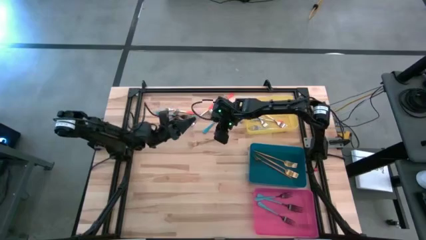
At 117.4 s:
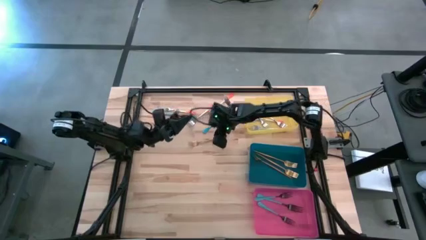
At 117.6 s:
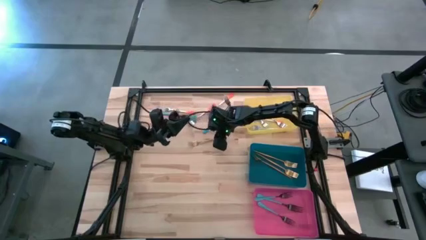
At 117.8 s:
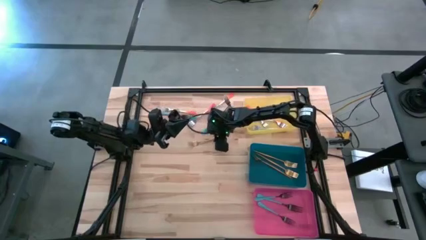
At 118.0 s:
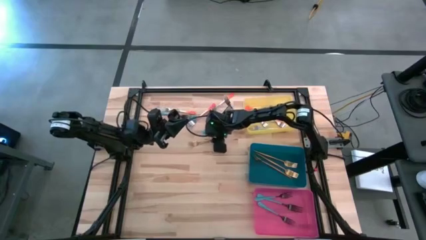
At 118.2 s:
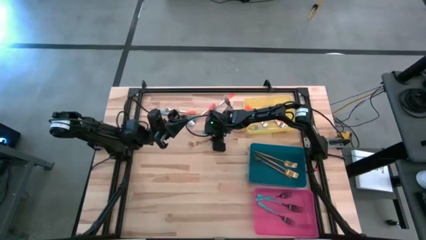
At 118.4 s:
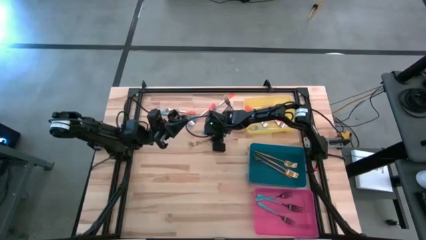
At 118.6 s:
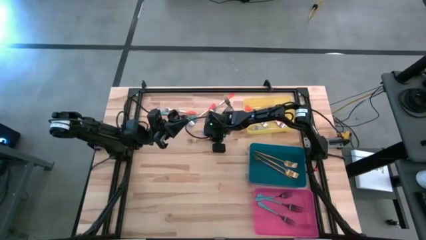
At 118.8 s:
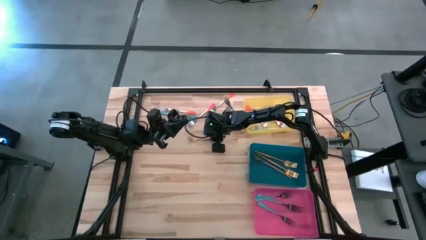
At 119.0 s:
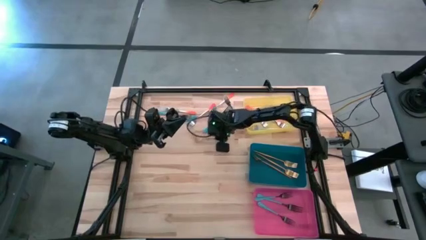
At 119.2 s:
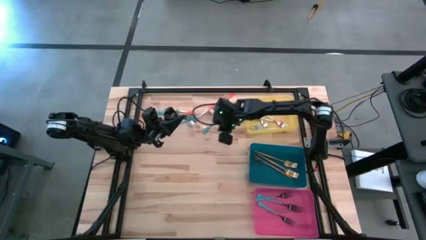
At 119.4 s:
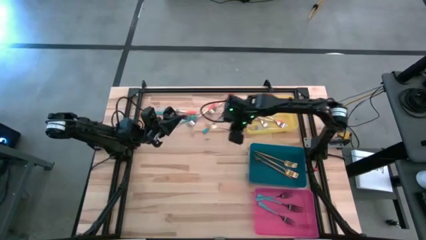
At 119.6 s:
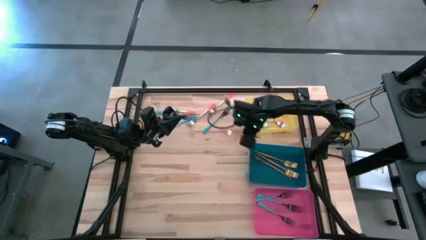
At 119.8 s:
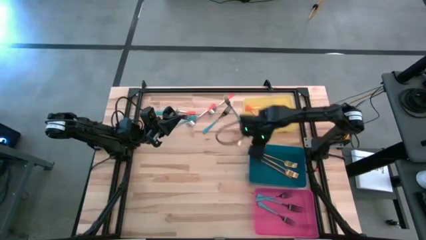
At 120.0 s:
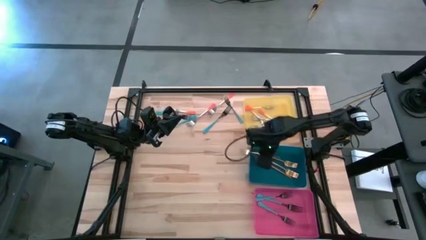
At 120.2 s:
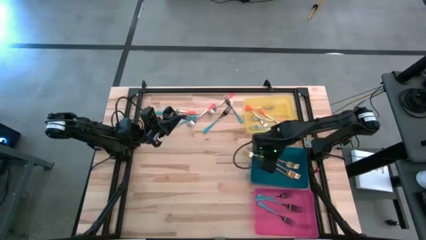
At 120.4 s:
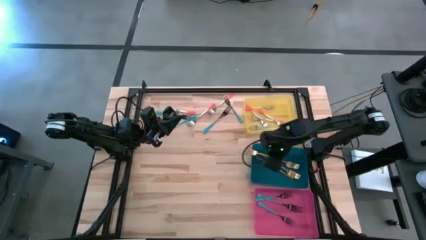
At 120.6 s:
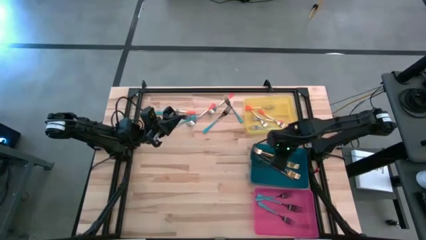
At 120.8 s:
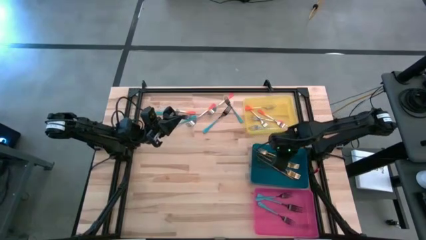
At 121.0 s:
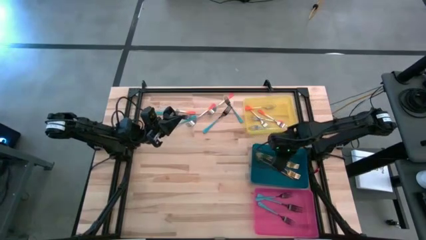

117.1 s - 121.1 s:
Task: Sort silverware by color (type)
Put the gold fork into the blue bin

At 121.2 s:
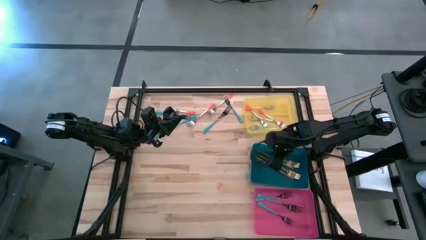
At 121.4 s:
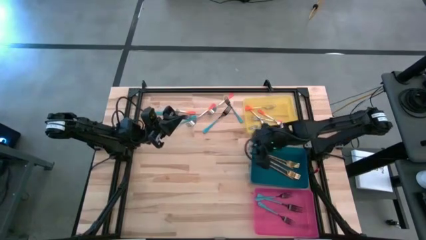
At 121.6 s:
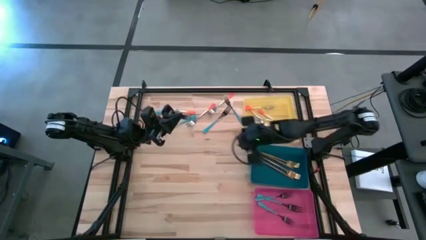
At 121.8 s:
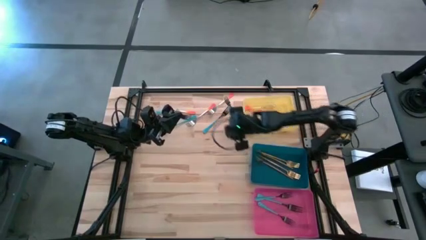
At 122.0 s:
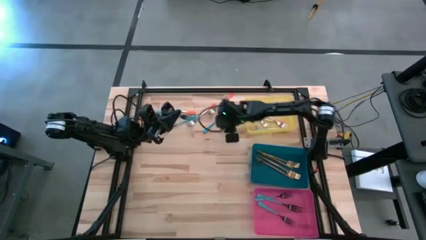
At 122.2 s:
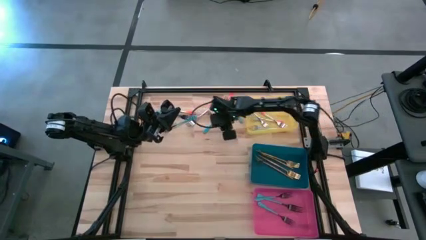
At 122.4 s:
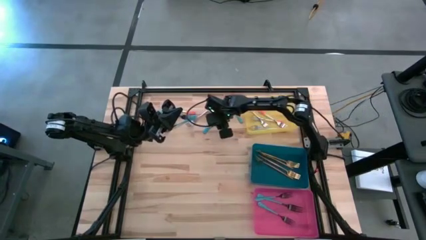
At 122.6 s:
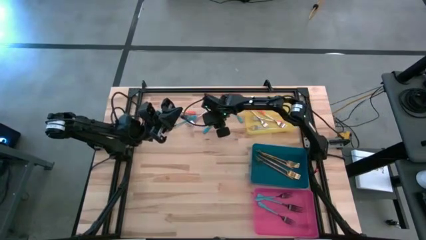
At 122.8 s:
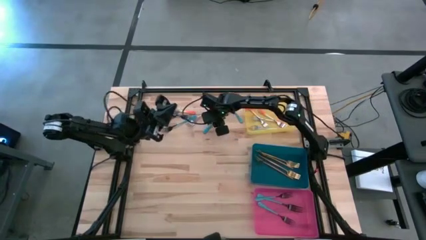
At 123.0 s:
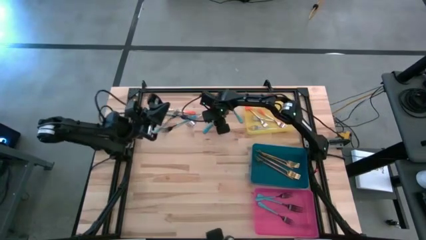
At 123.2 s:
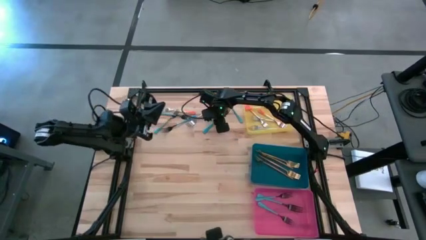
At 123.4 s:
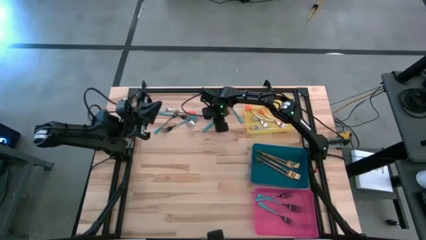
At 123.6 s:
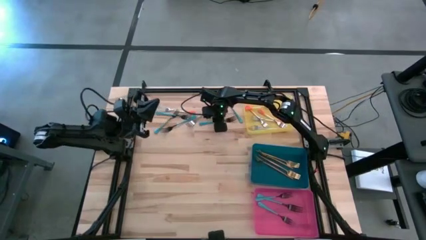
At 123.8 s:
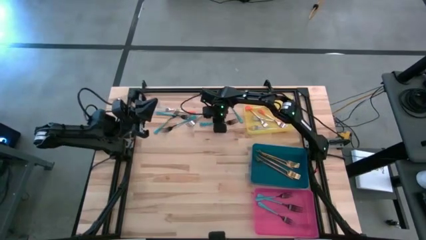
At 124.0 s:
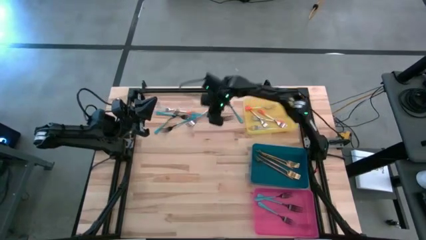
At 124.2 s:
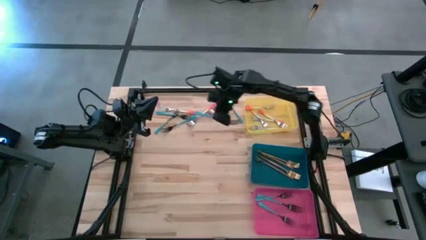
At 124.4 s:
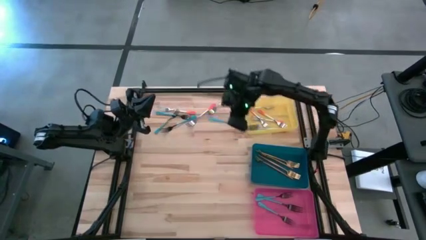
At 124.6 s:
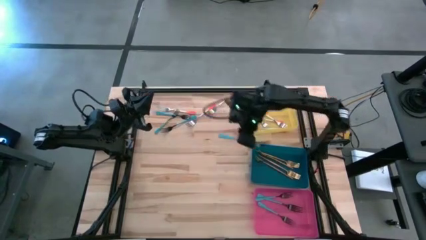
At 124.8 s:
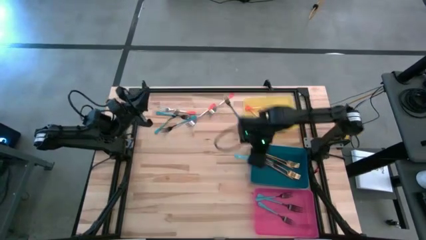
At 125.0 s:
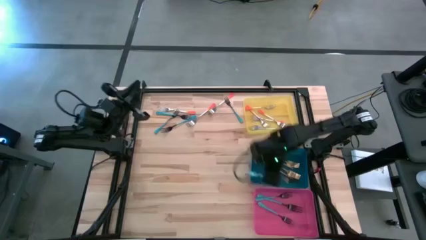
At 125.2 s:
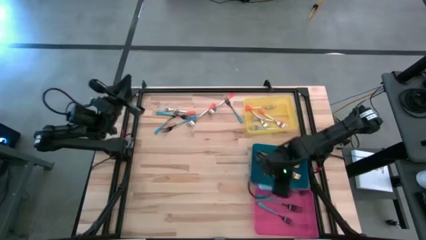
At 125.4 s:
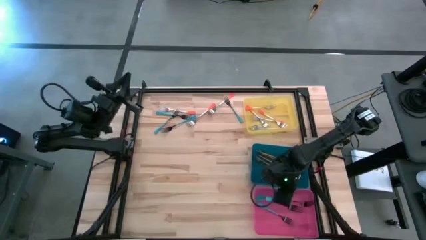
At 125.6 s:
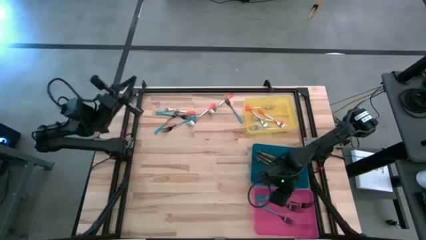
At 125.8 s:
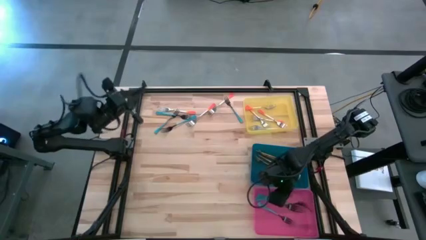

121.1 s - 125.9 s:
Put the blue fork into the pink bin

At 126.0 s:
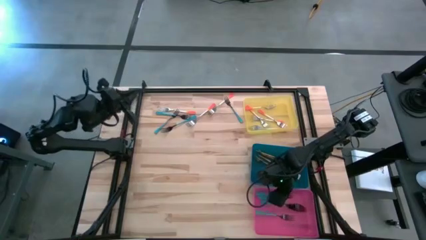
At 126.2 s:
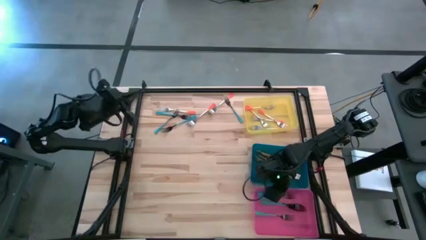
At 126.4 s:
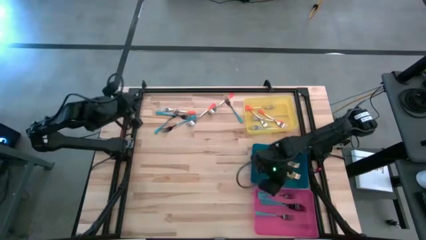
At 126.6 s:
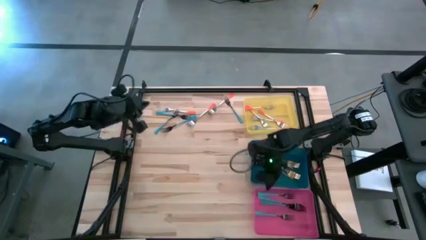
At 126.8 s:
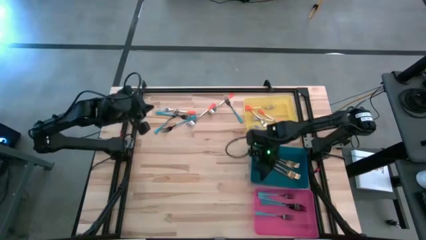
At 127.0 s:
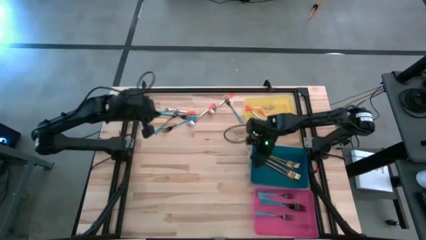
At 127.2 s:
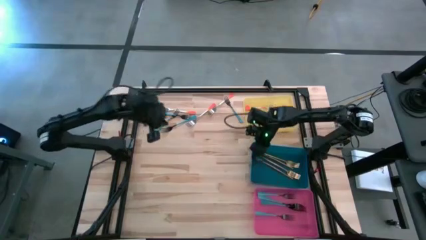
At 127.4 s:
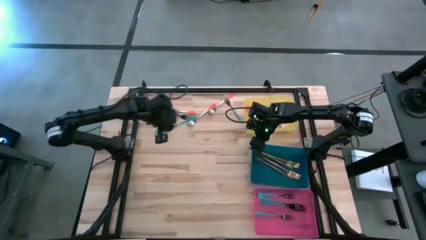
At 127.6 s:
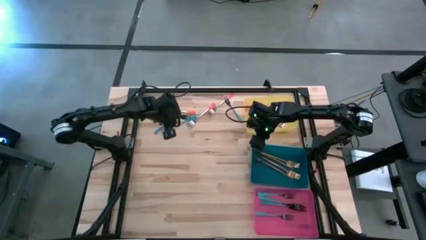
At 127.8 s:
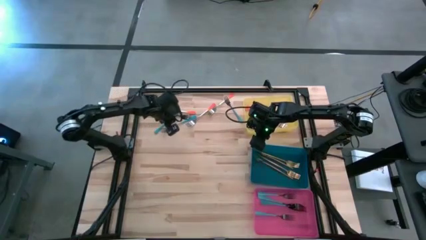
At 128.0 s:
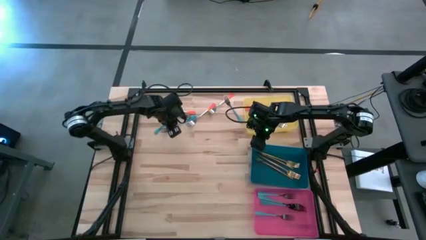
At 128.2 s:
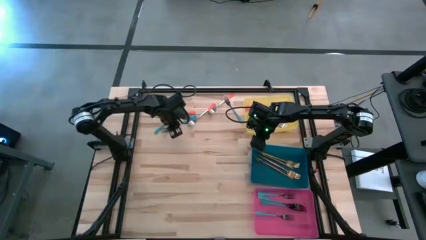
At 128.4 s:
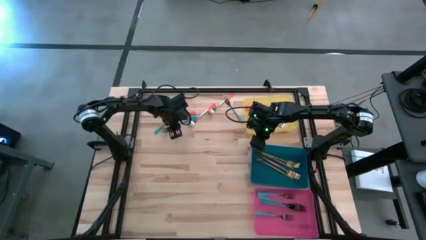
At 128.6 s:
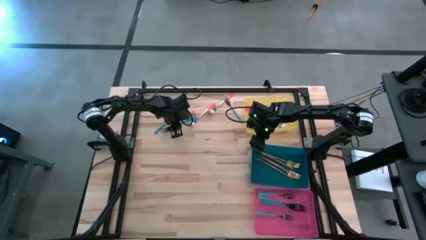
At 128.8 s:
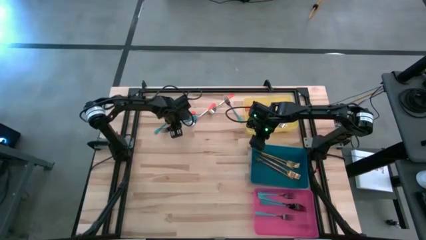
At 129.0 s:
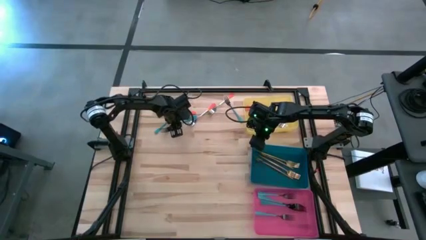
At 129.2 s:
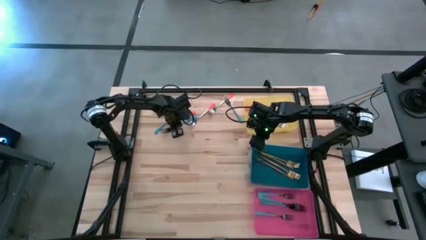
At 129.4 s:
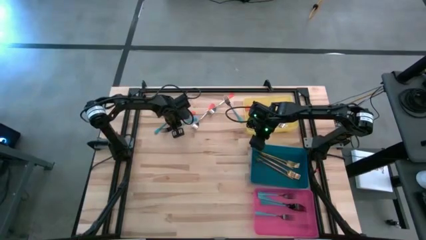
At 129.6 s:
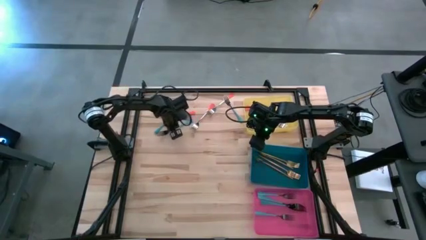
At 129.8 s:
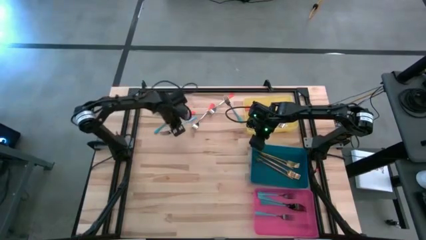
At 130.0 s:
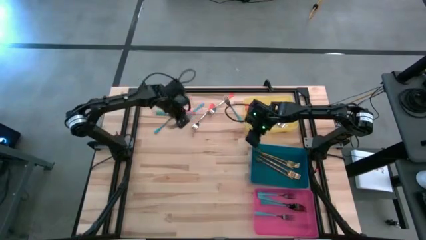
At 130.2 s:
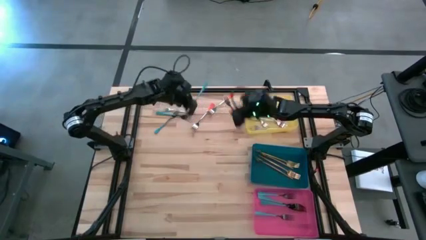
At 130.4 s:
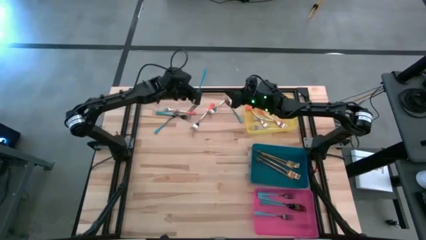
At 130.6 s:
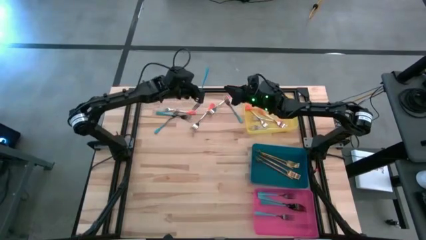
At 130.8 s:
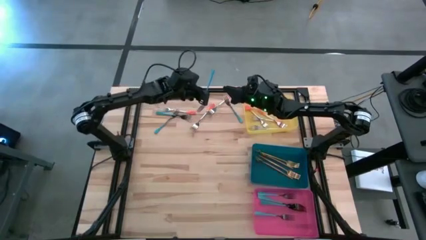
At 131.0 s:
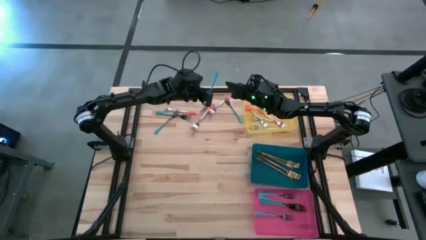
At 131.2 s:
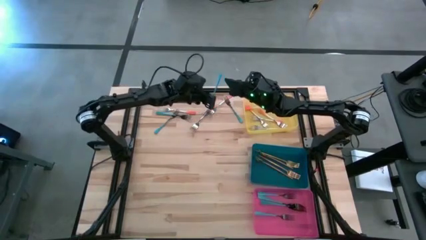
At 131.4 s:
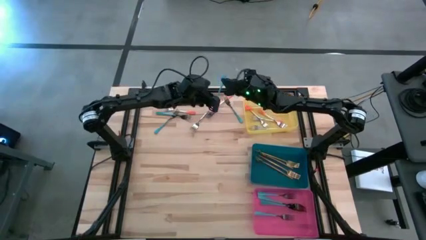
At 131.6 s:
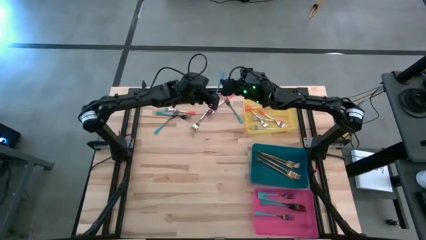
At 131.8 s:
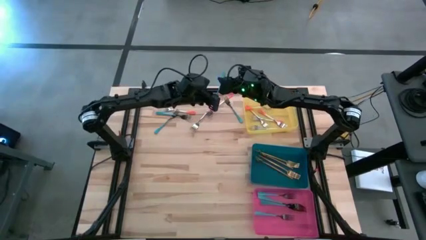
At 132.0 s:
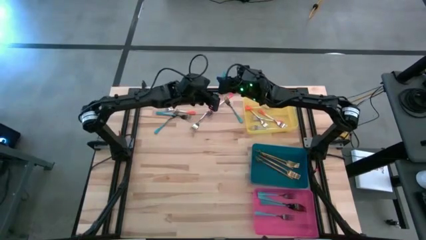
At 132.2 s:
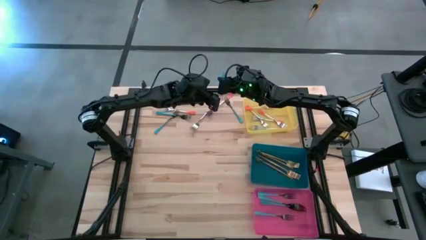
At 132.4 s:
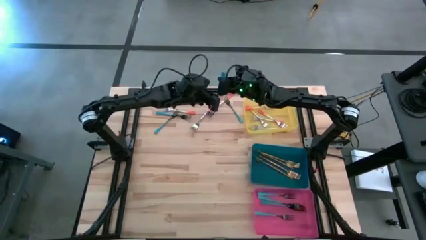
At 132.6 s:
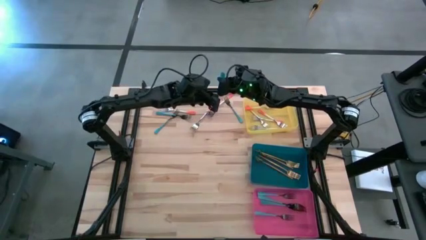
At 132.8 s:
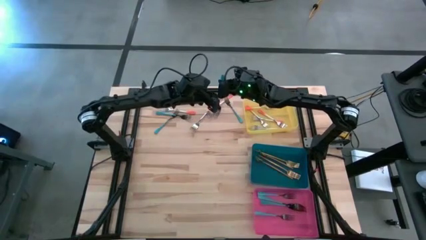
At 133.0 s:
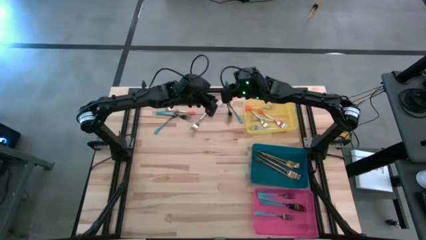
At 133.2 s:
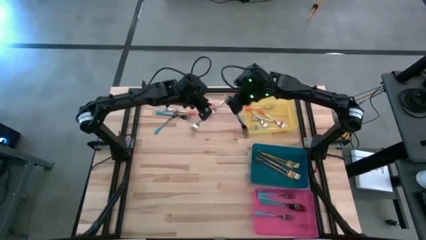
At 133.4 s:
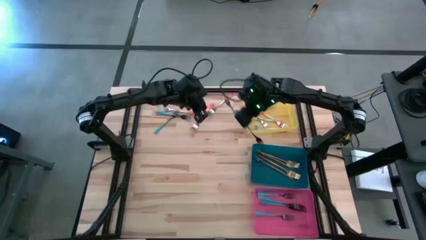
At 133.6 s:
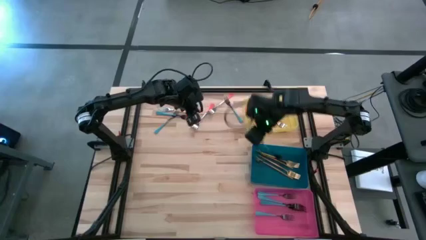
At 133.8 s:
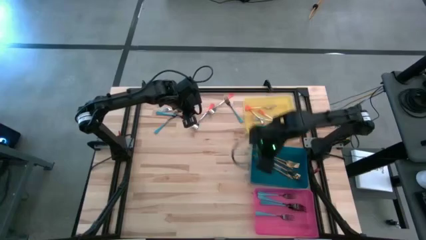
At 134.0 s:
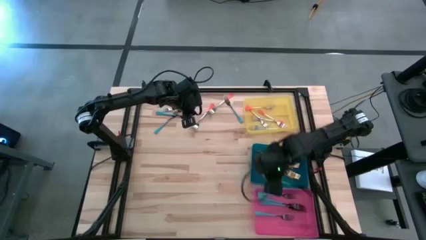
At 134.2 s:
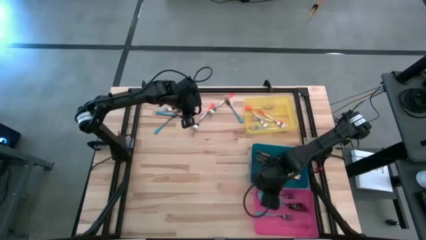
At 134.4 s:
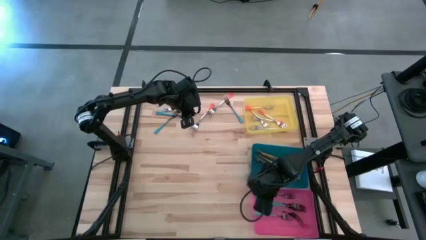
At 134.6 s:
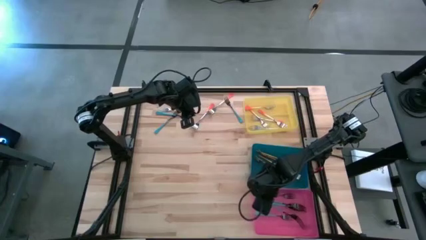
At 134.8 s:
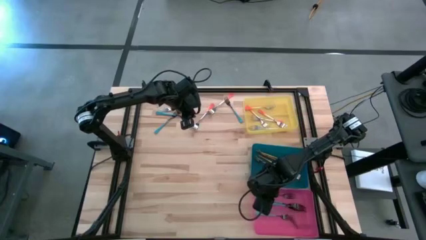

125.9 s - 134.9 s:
Put the blue fork into the pink bin
